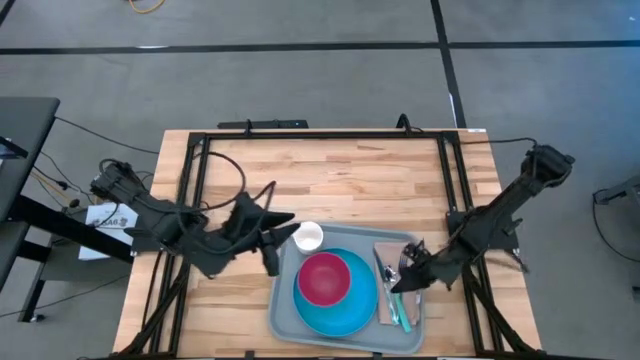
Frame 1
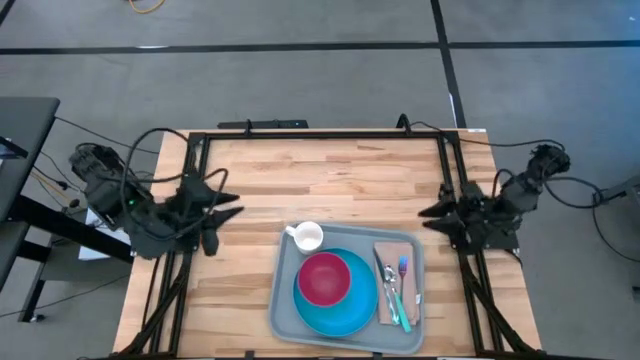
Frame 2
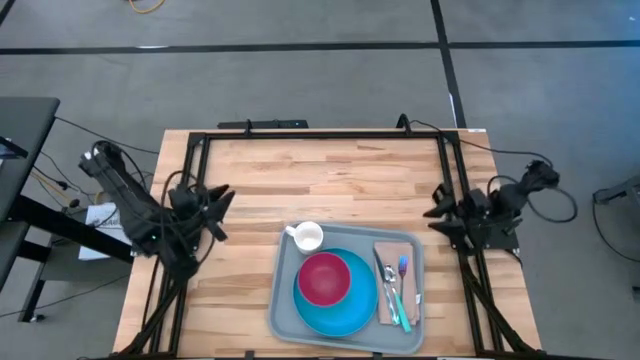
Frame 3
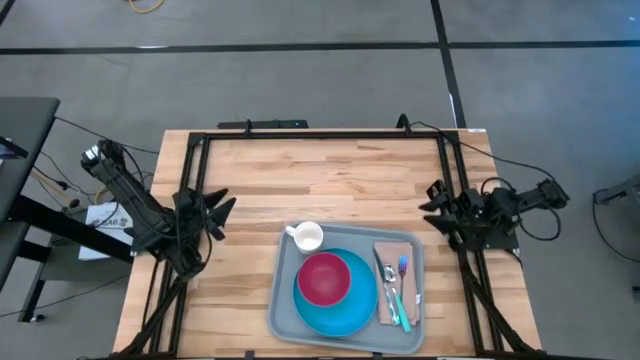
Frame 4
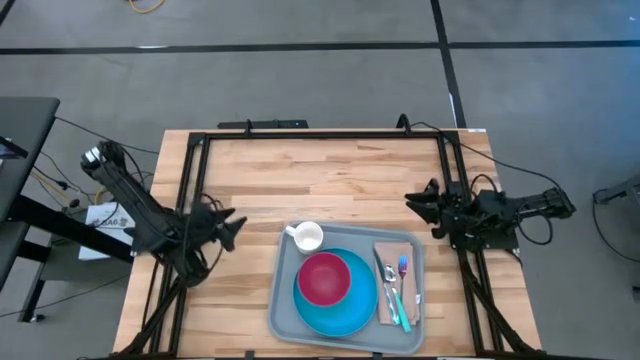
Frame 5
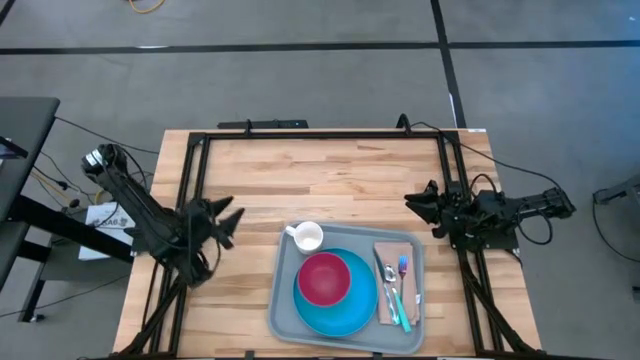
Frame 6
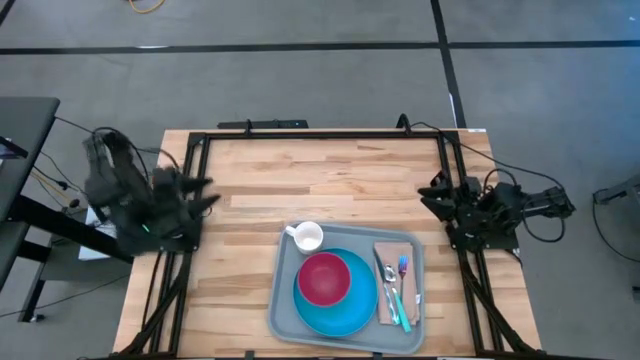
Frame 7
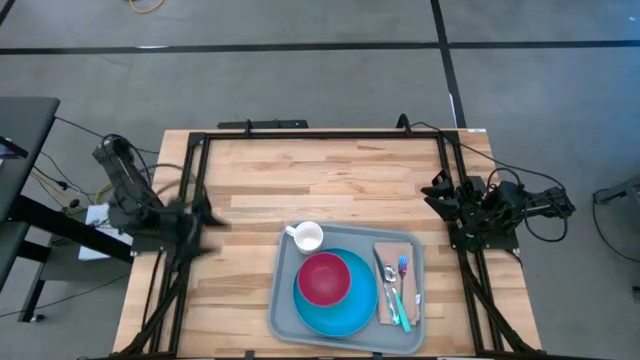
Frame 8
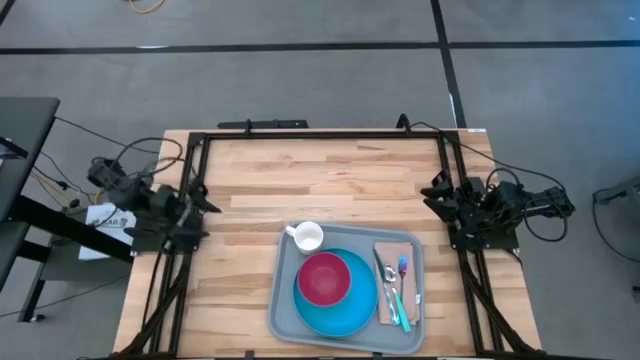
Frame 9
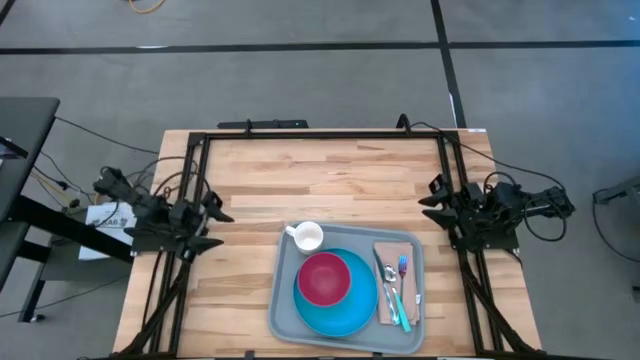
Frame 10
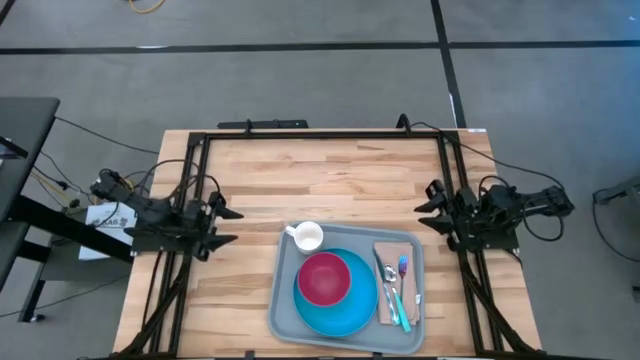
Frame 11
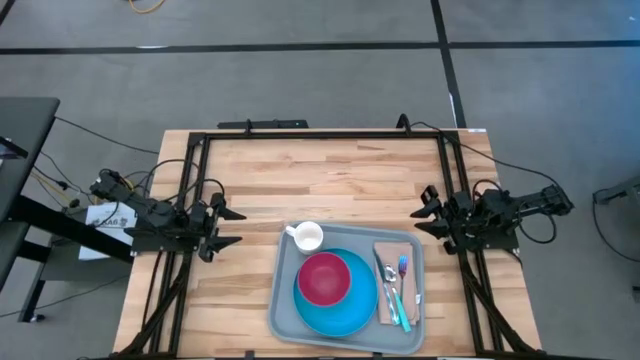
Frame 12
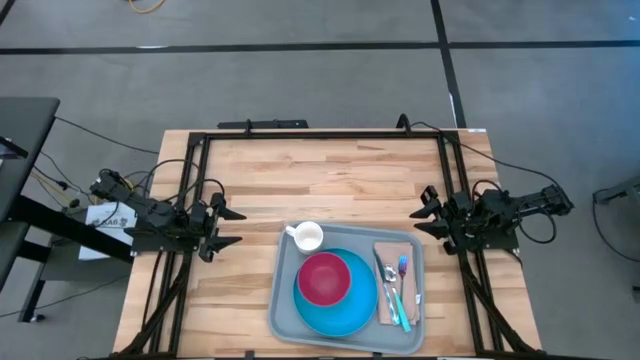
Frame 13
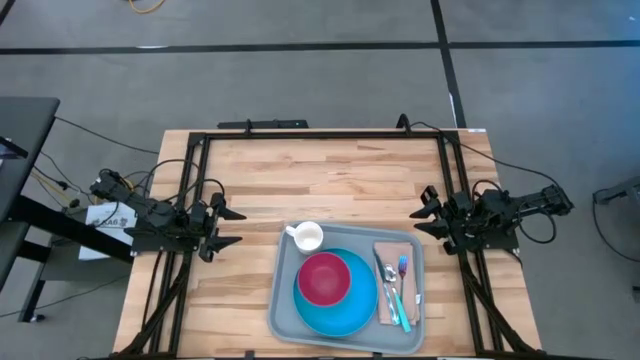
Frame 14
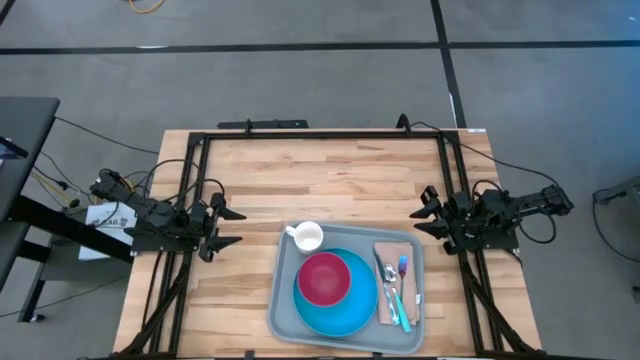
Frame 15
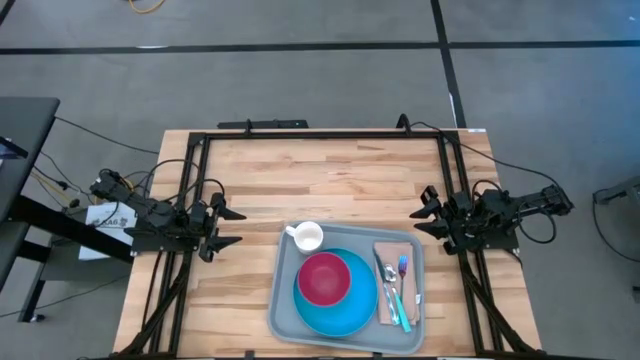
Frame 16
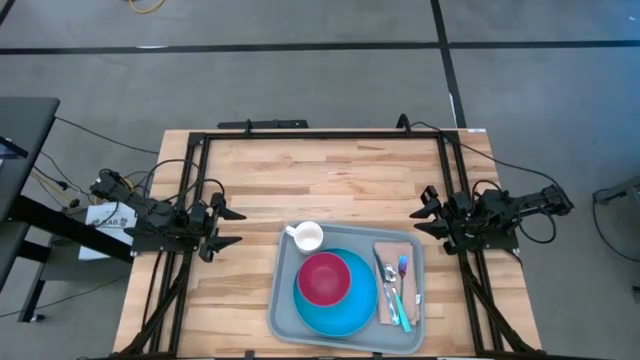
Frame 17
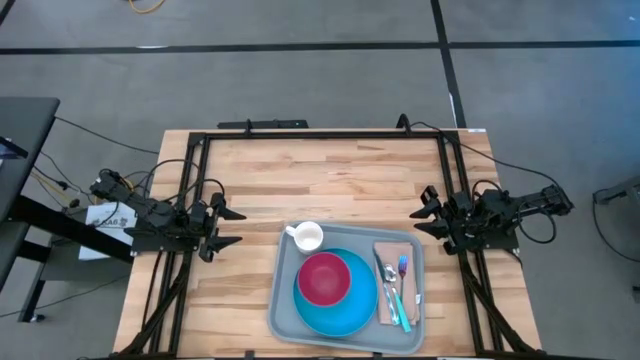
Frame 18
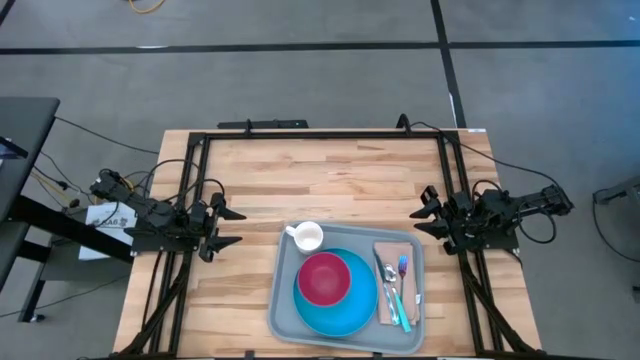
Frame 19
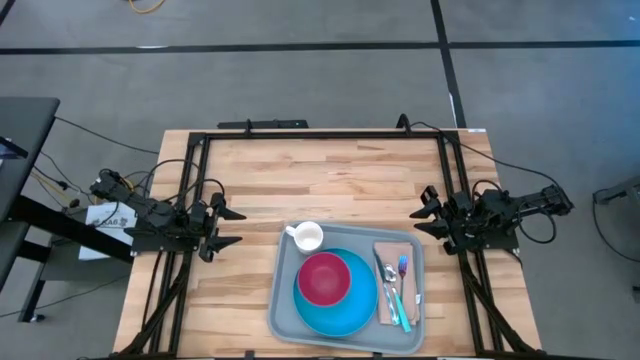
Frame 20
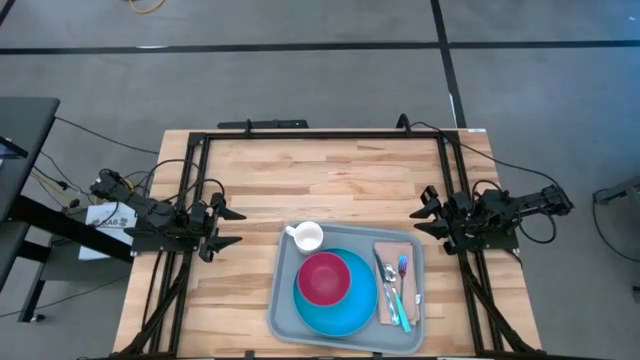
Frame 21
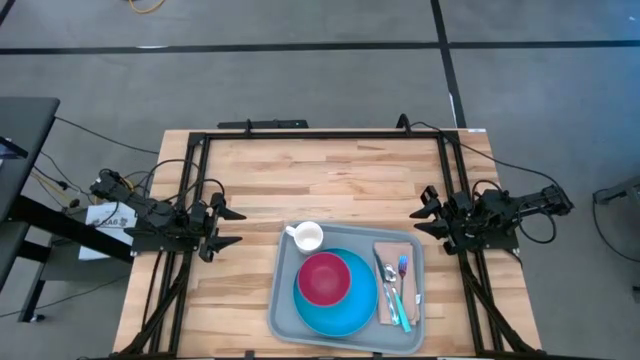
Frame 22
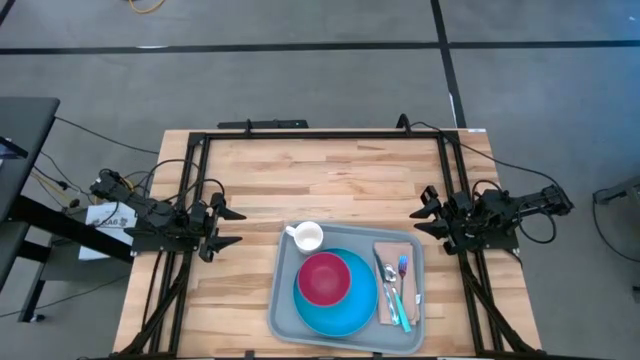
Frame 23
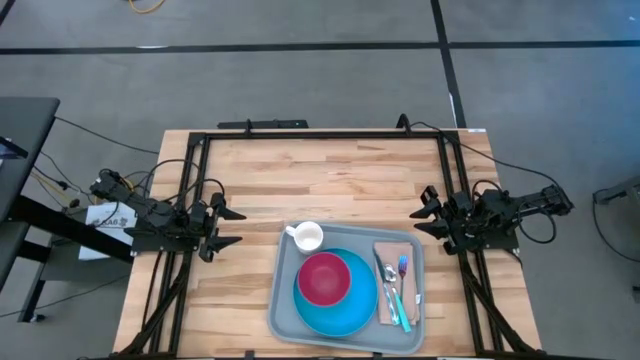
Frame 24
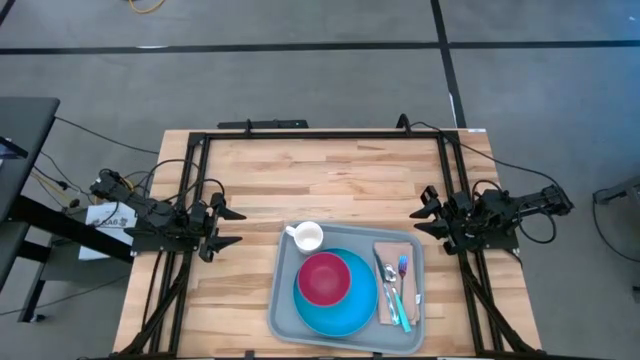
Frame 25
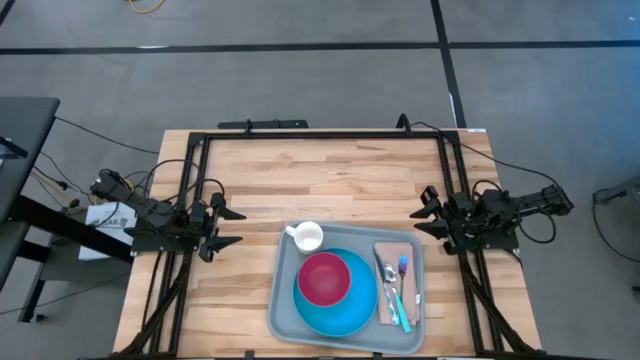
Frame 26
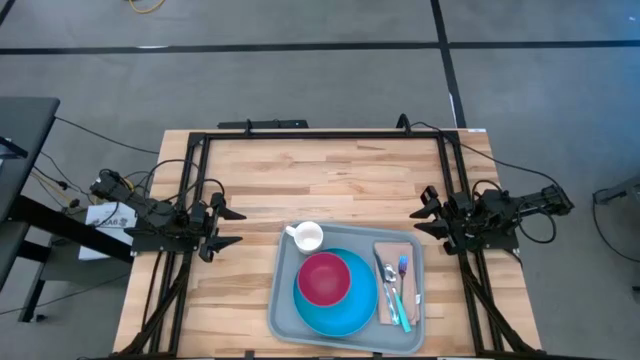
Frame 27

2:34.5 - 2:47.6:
Task: Set up tray
Return to home position

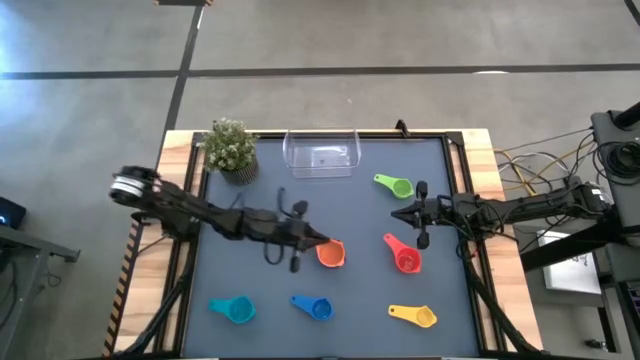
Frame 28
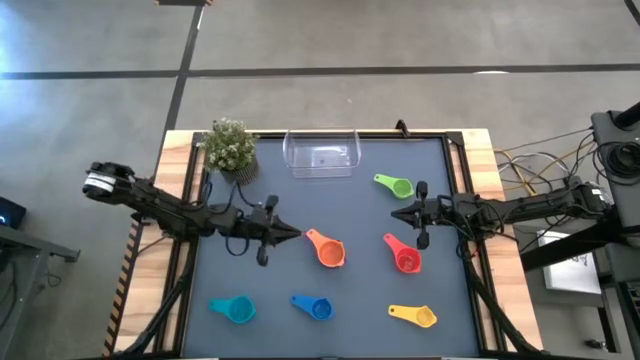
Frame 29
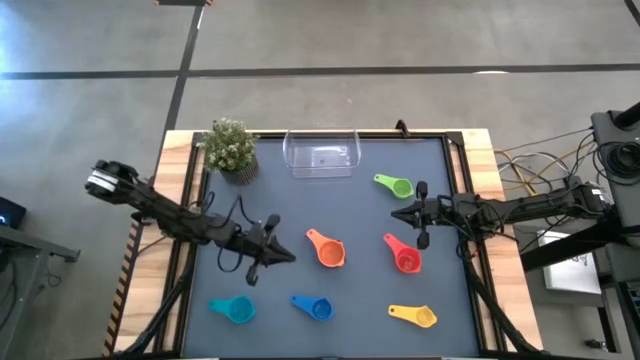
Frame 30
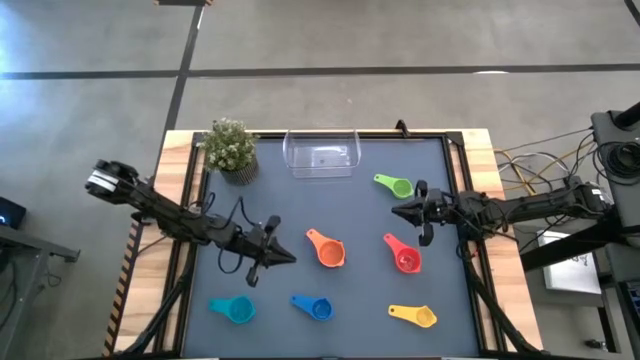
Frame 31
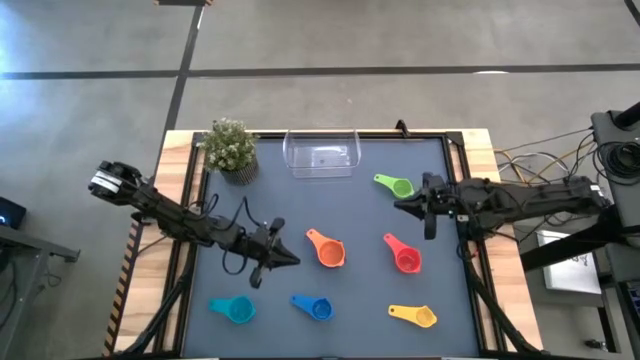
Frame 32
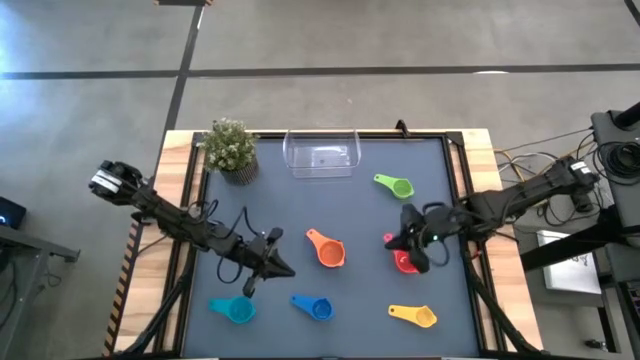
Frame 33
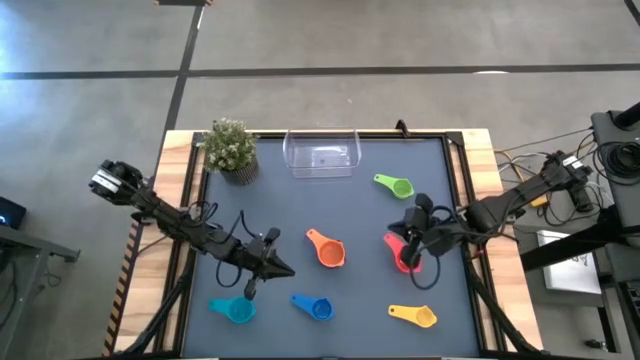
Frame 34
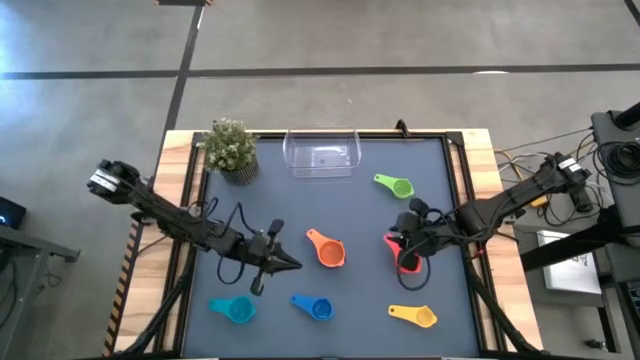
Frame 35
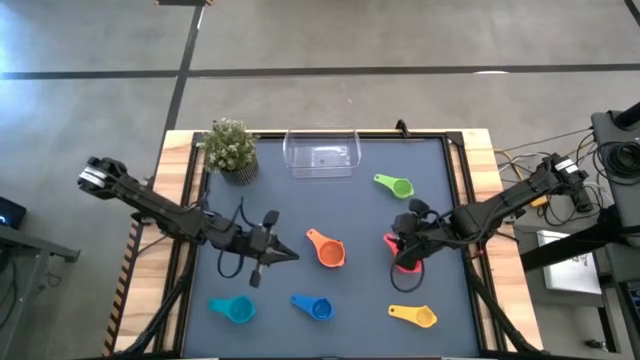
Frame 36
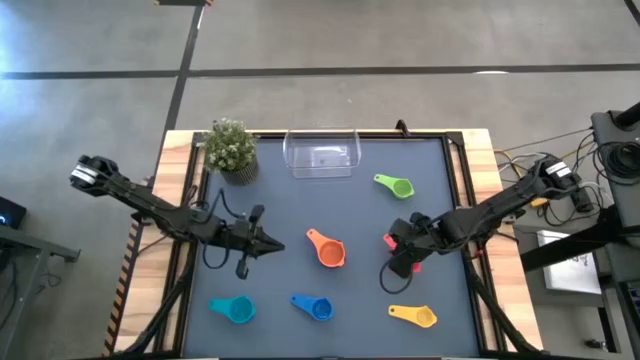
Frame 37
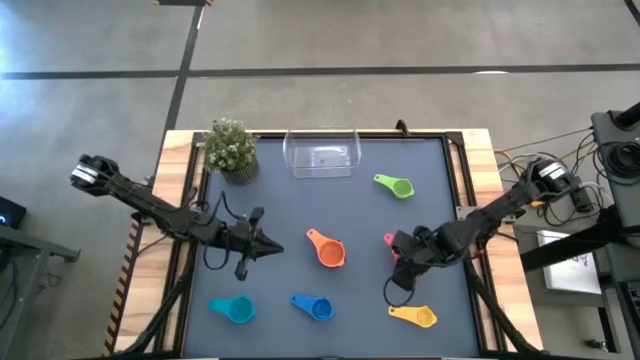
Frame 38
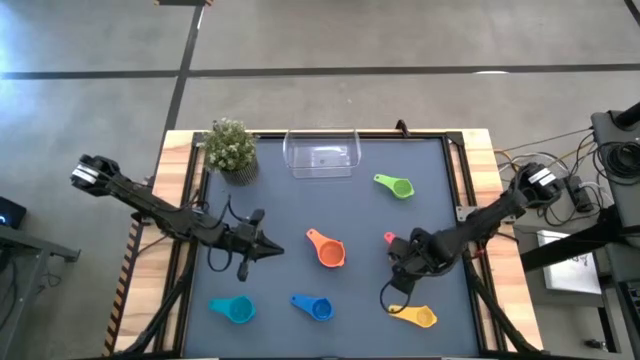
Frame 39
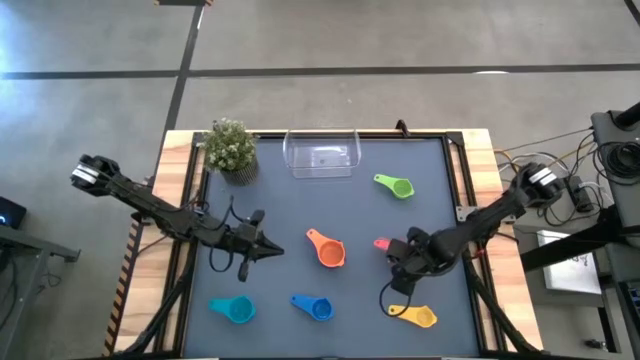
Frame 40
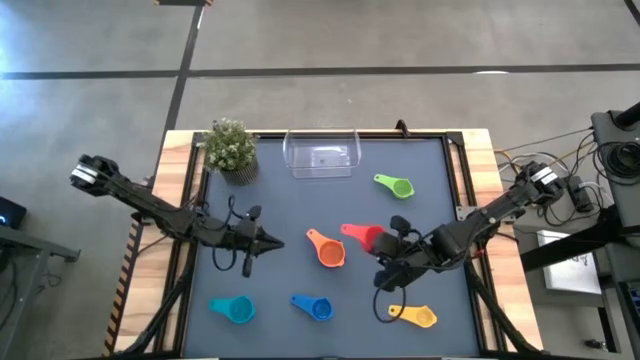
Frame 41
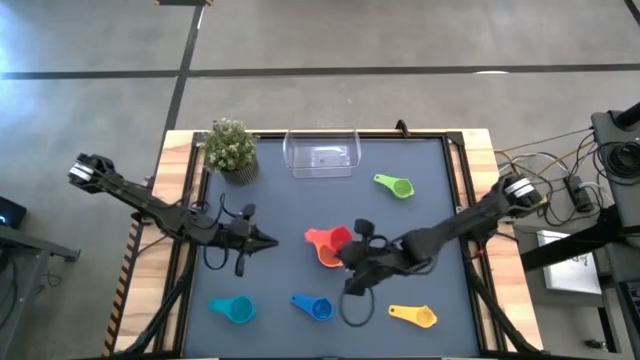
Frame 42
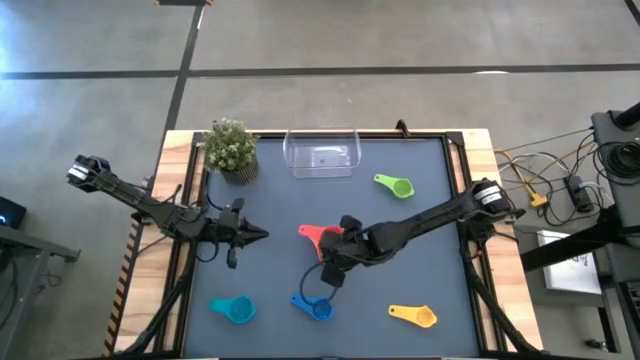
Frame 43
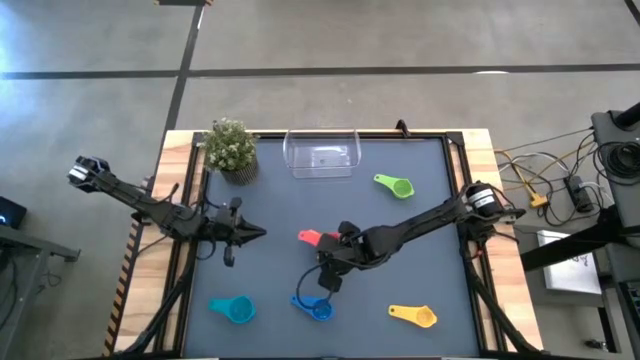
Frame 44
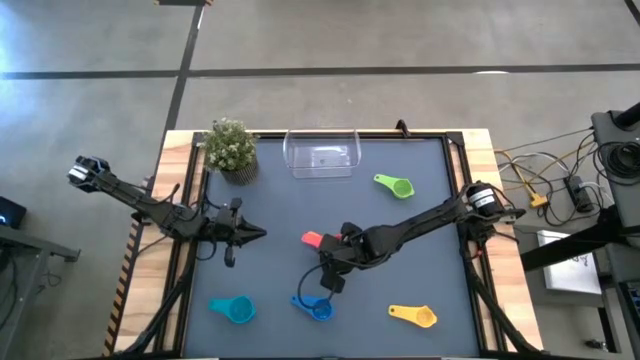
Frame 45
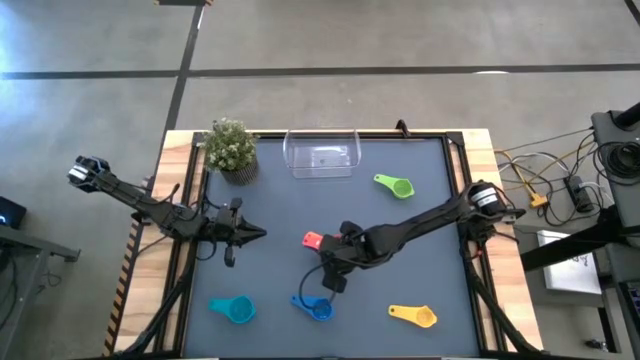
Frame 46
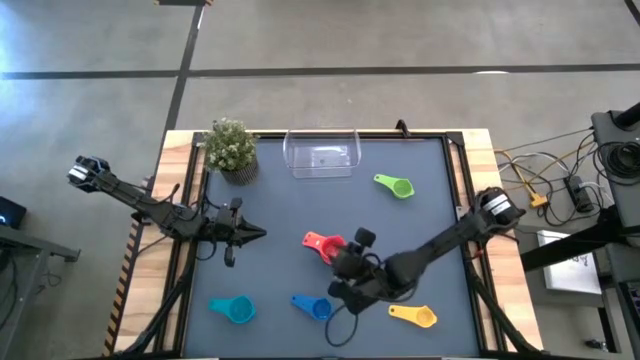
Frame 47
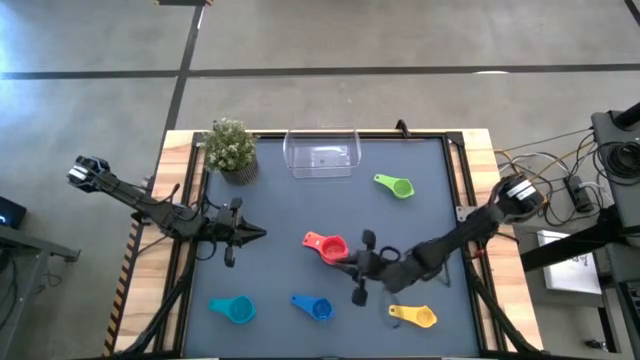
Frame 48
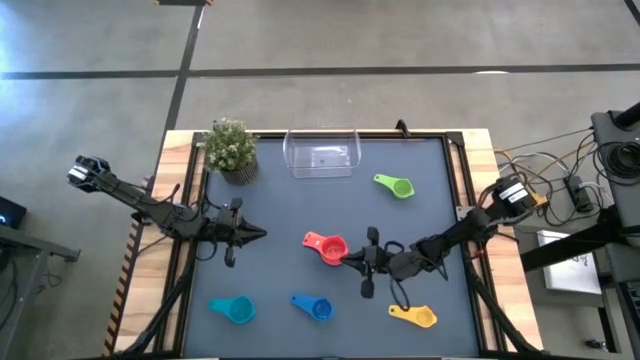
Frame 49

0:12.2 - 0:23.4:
Task: Nest measuring cups in basket
Stack the red measuring cup on top of the orange measuring cup
